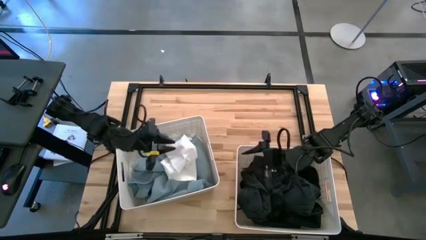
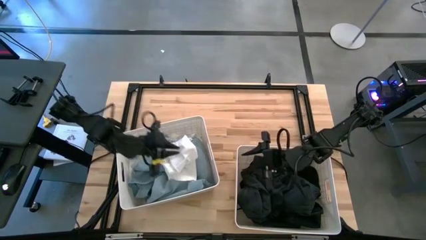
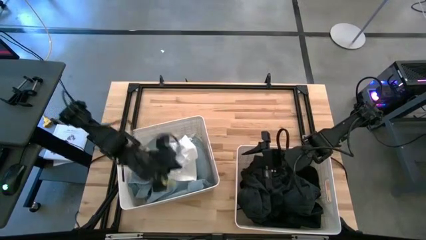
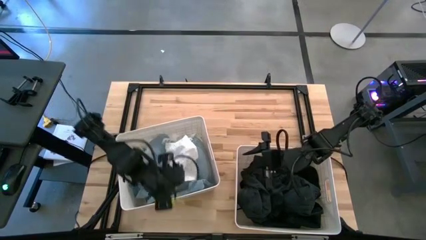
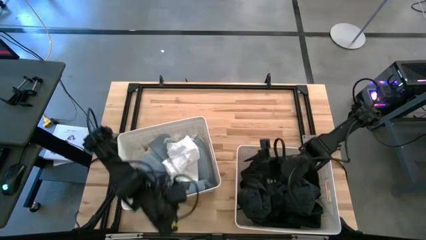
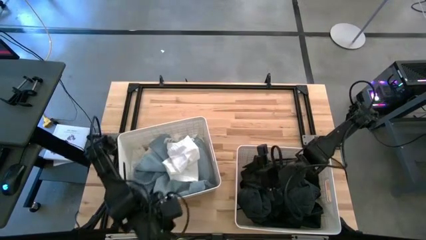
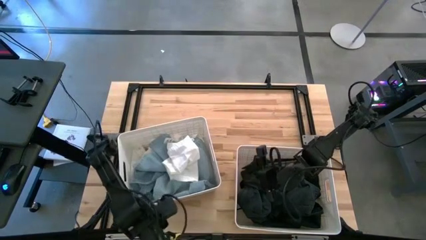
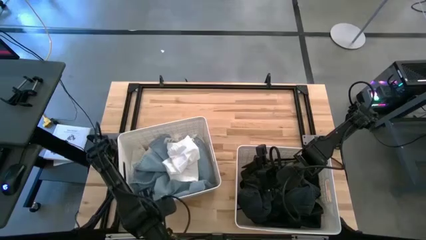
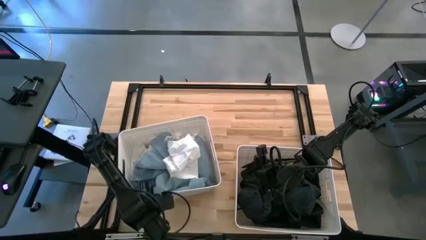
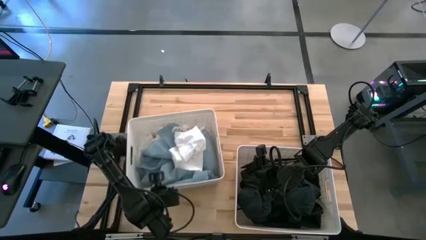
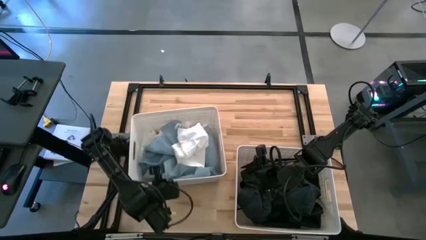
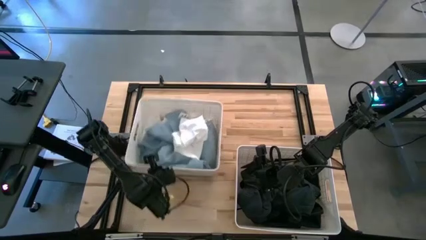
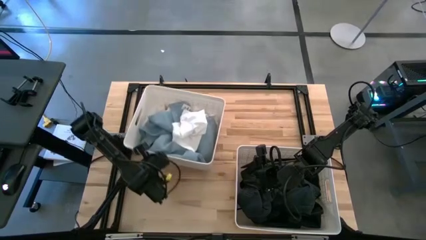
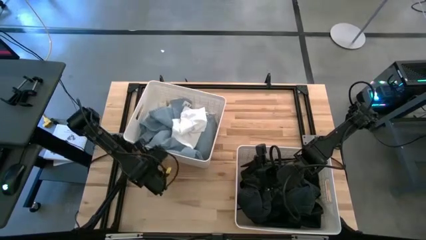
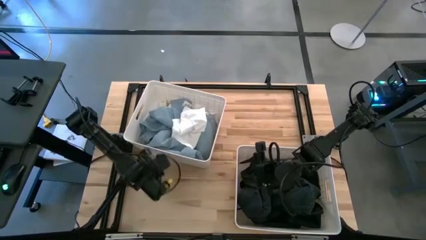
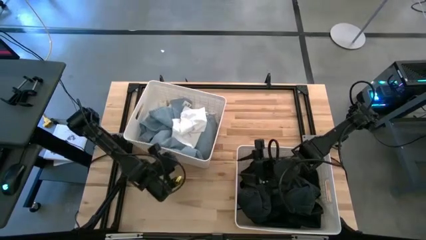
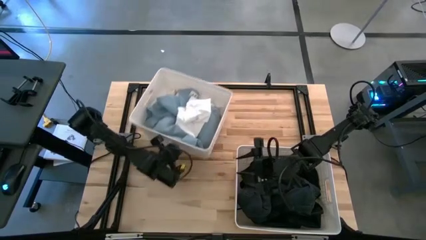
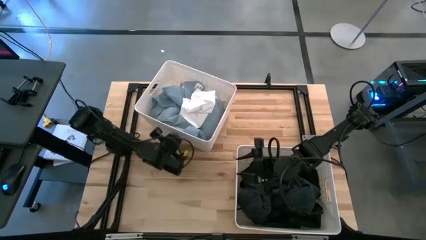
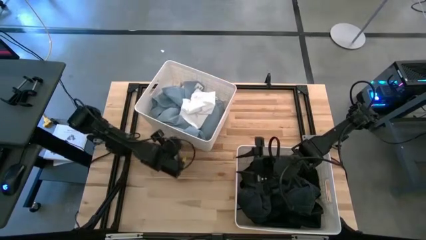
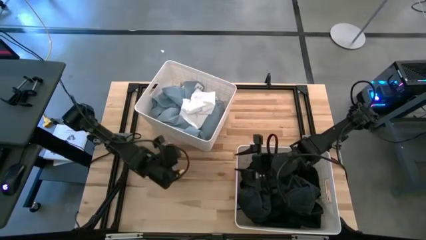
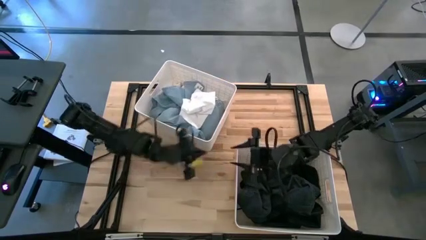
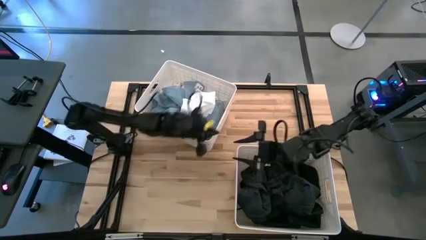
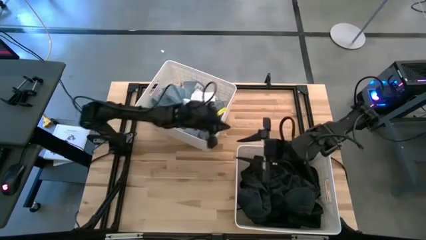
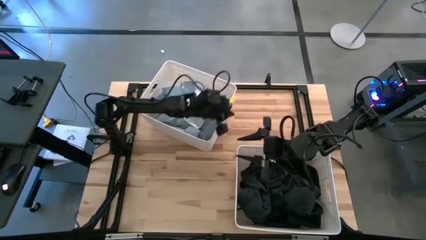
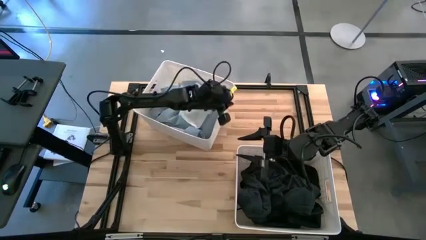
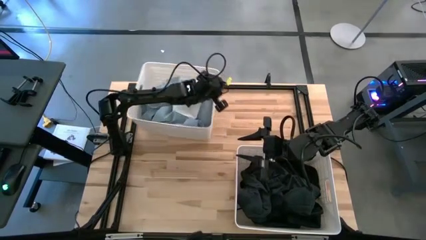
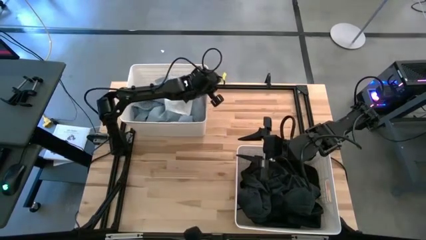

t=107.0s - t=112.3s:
Task: Sort clothes
Move the left white laundry bin to the top left of the table

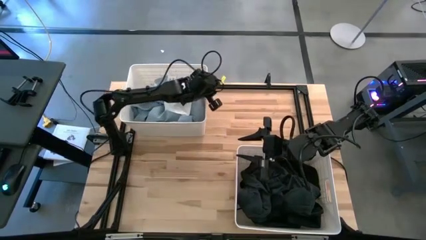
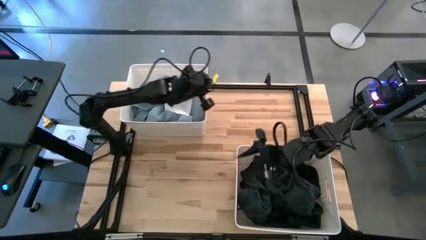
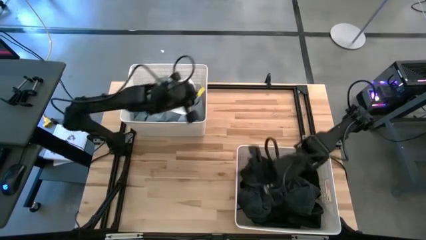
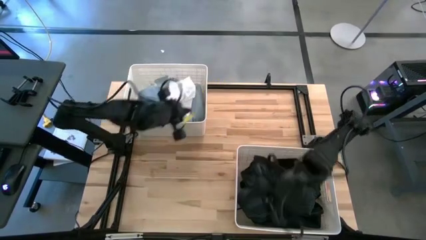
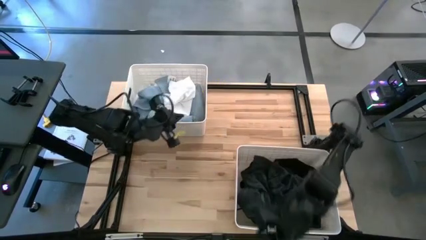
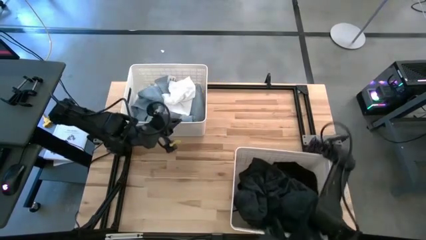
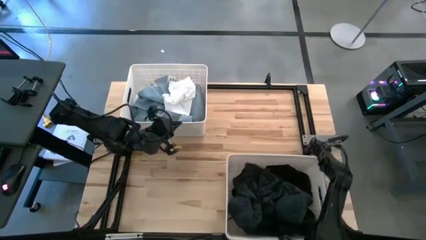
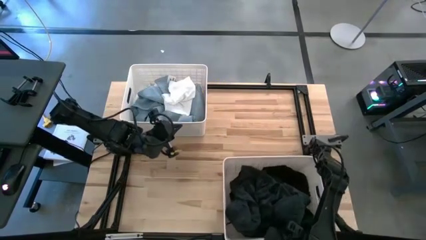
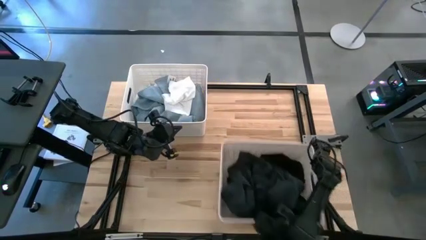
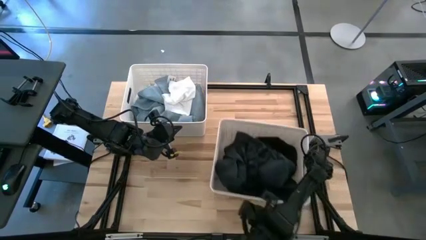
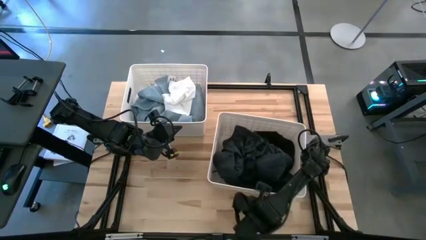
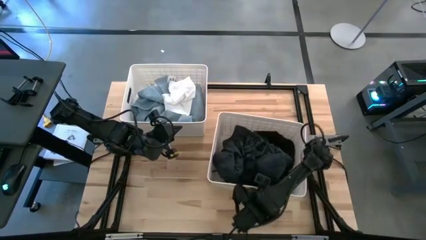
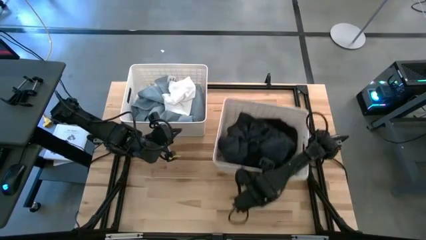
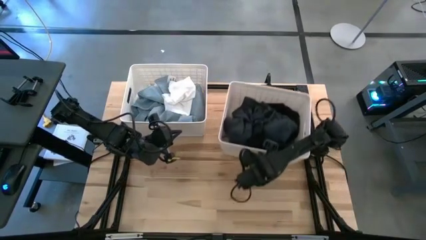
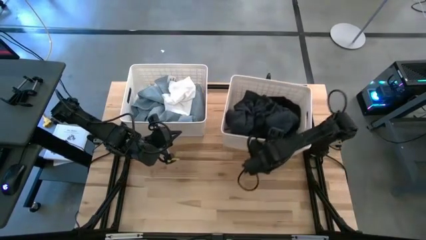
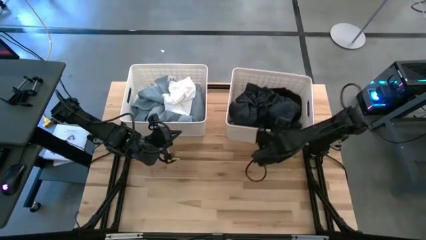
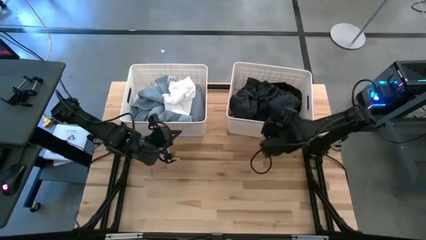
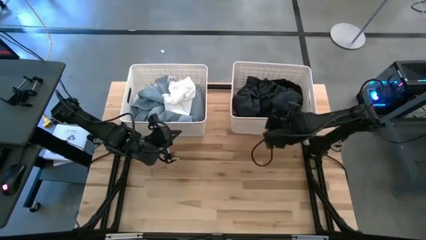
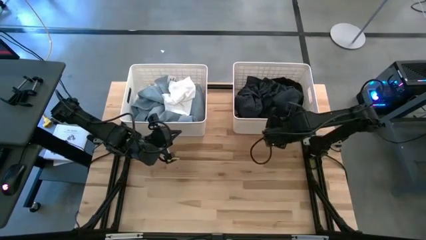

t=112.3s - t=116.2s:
Move the right white laundry bin to the top right of the table

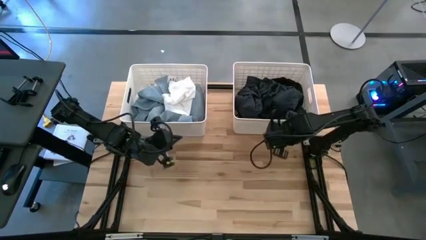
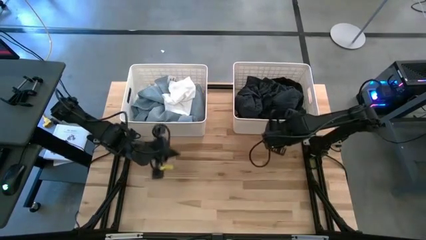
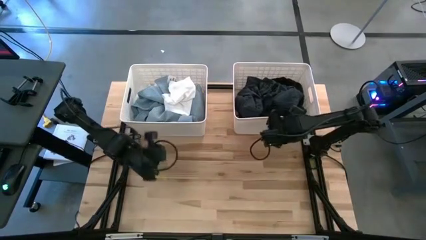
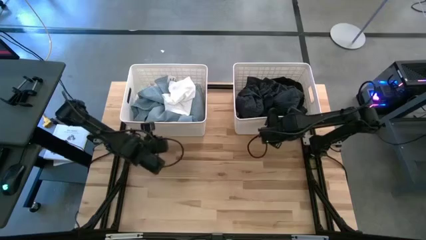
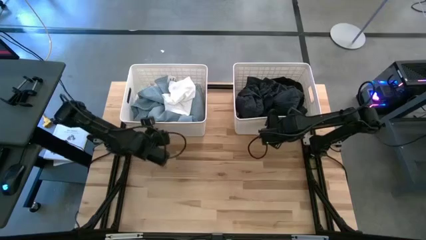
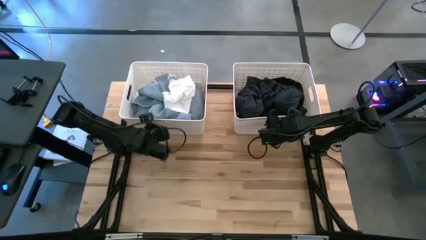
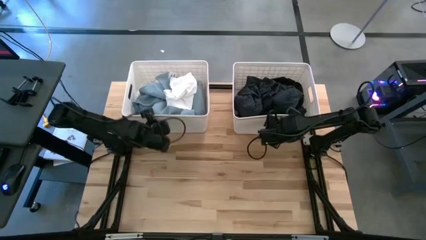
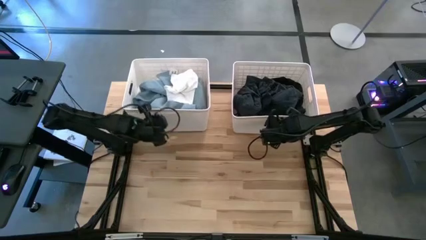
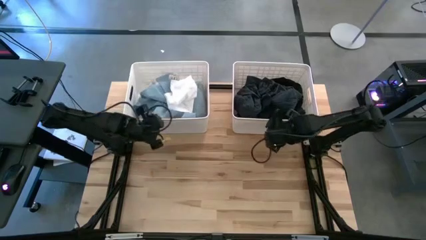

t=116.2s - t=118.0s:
Adjust the laundry bin

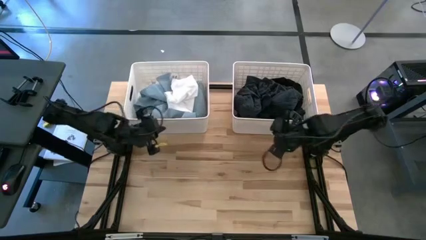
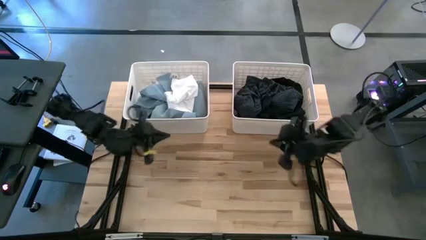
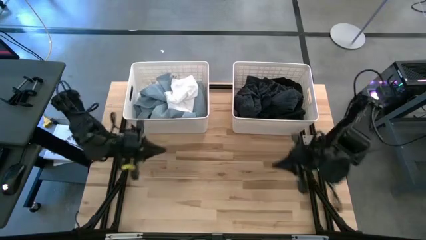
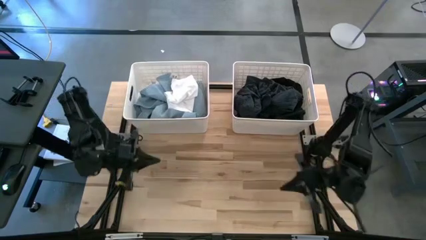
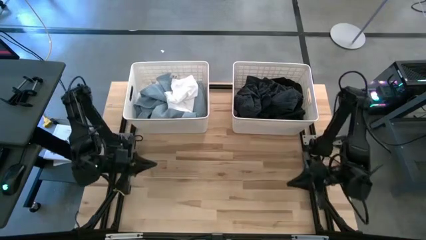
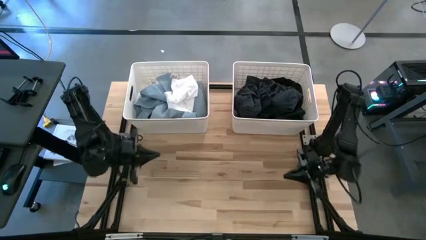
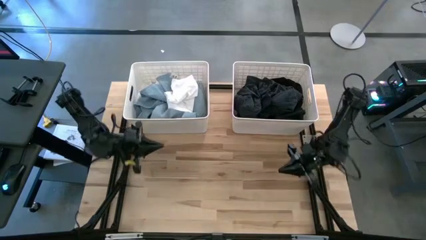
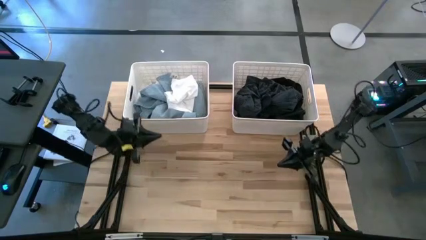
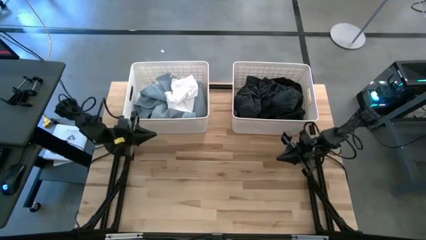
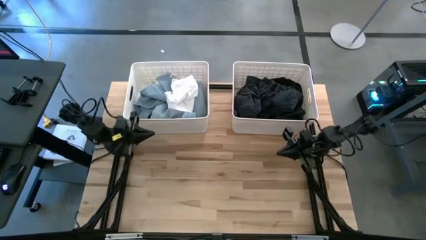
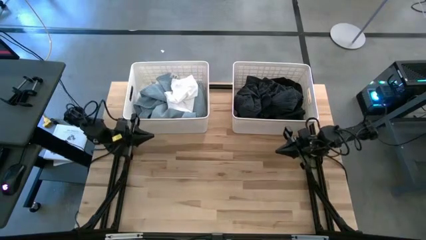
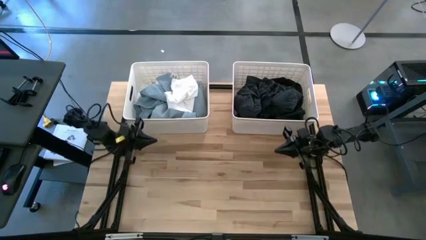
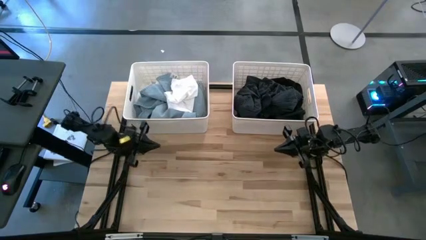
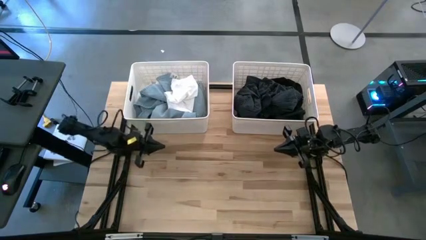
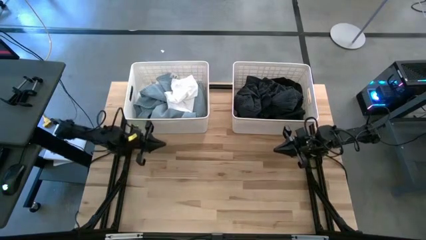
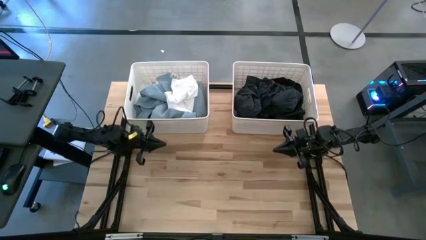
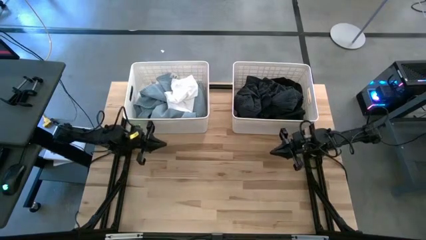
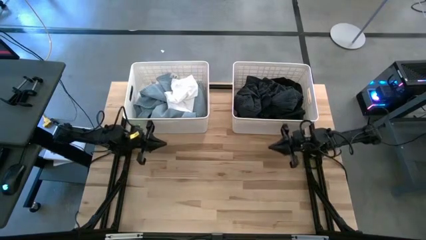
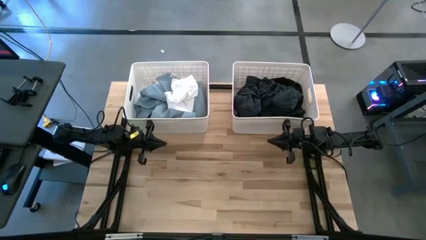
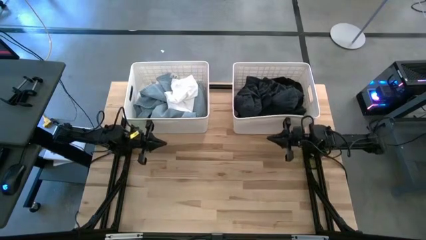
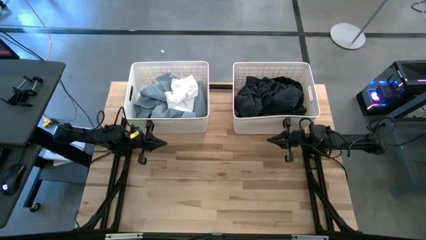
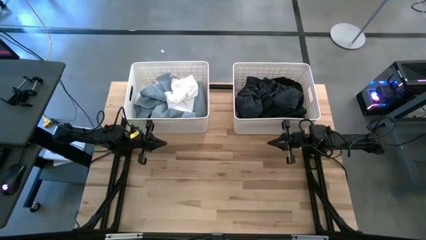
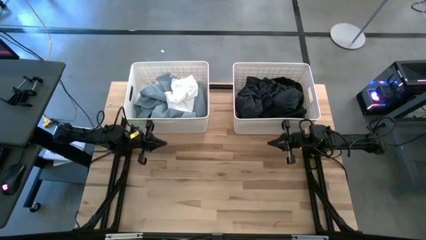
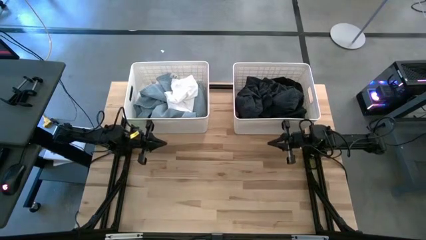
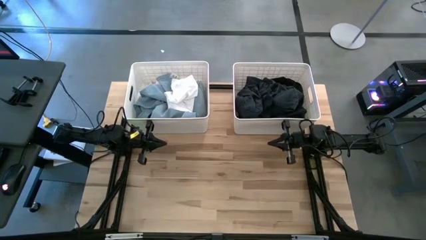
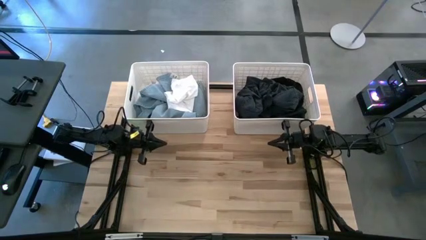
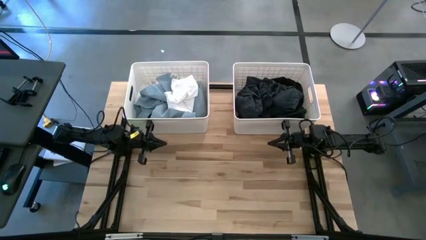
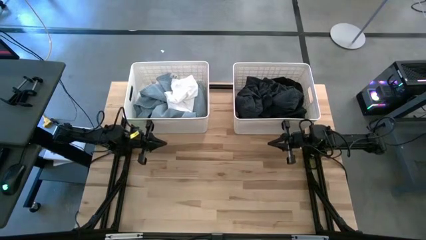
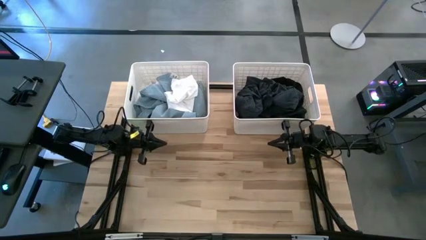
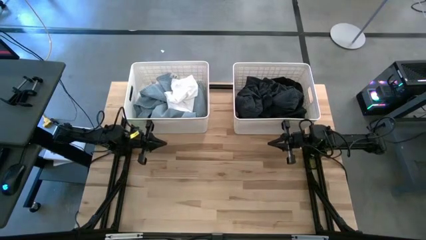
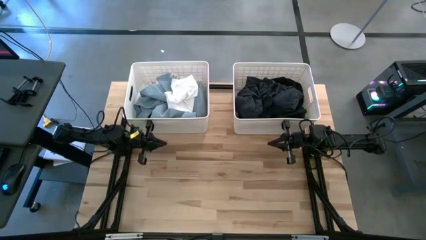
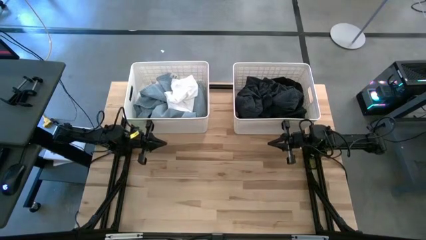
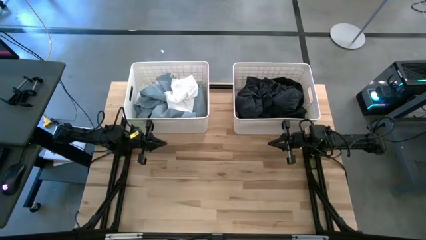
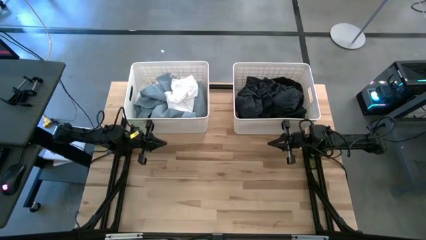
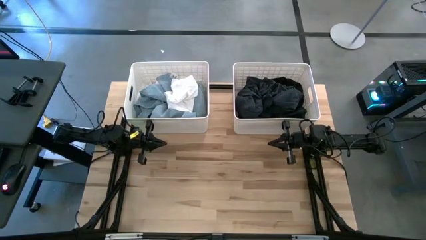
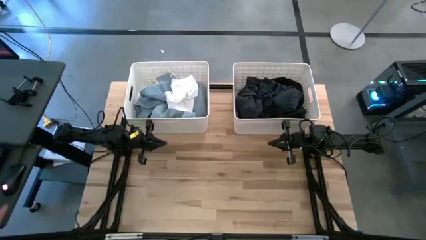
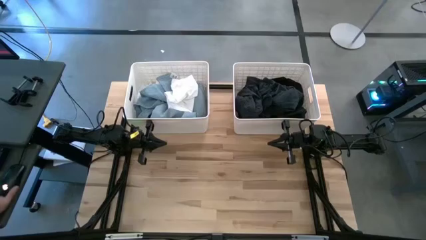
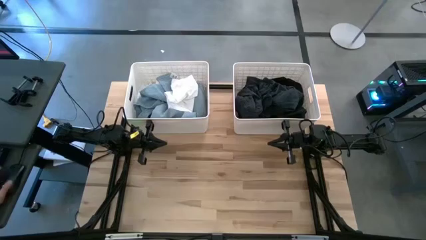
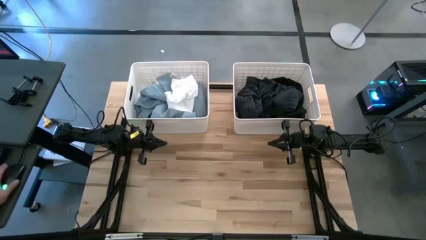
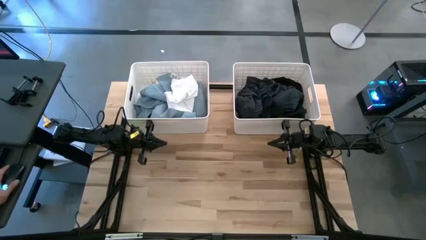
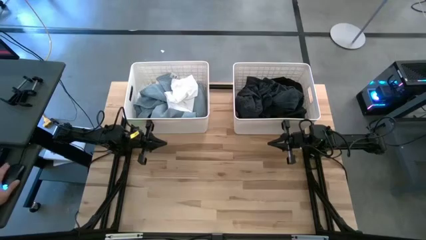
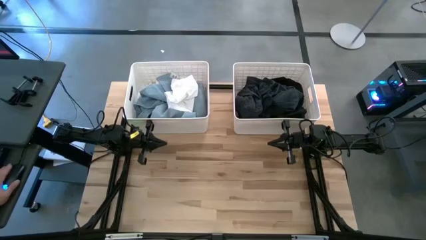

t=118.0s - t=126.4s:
Return to Home Position
